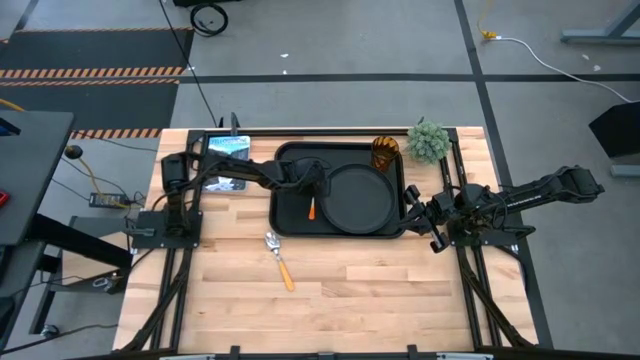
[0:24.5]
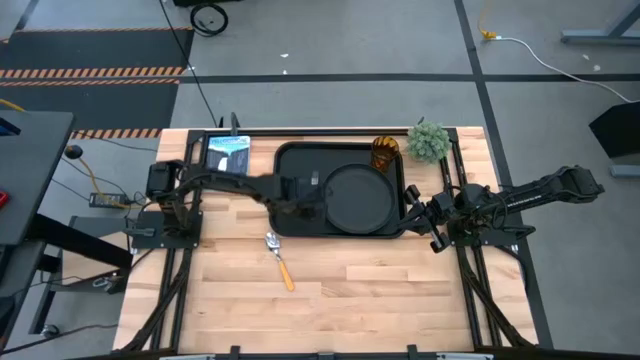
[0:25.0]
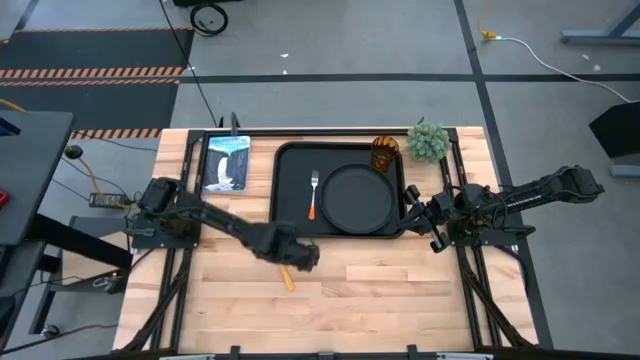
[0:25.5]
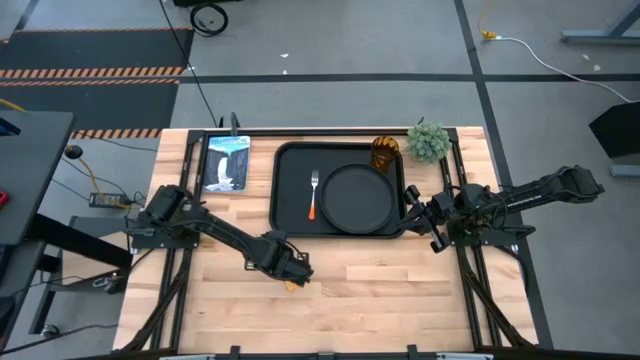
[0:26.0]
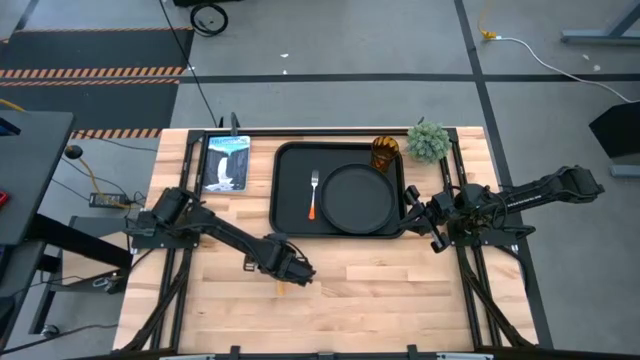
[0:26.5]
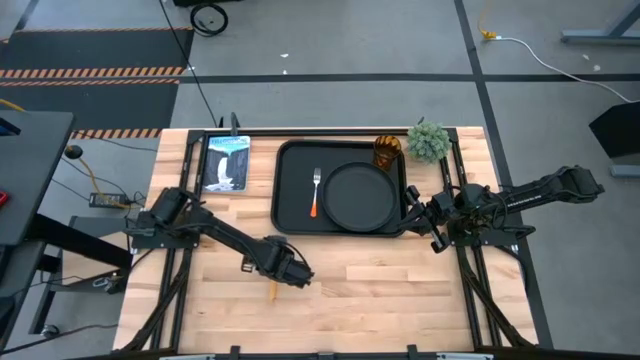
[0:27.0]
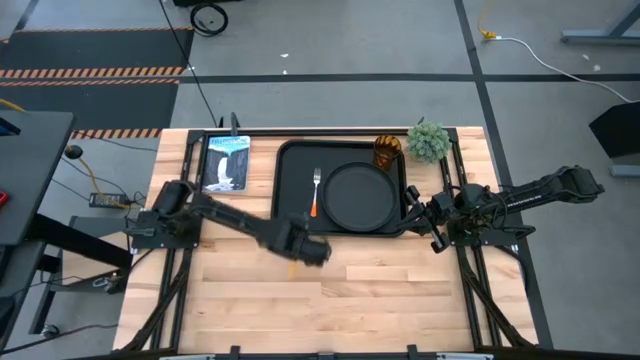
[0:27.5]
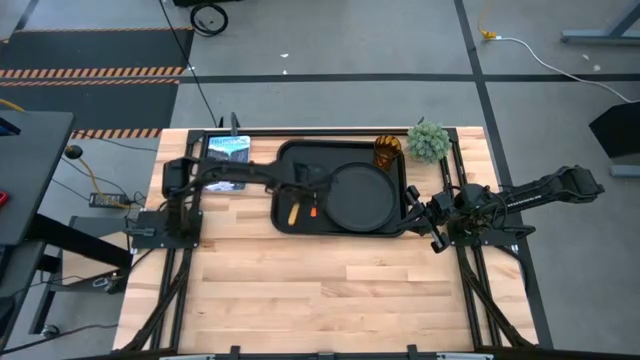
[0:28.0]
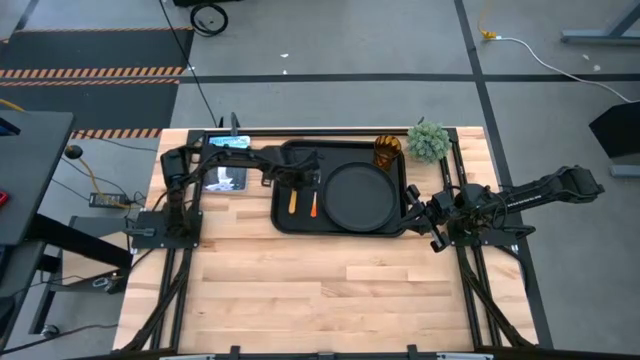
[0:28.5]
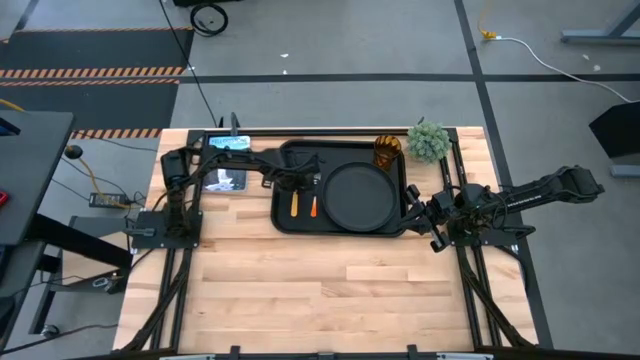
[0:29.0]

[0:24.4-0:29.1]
Task: Pick and place plate/cup/fork/spoon on tray
Put the yellow spoon on the black tray to the left of the orange fork

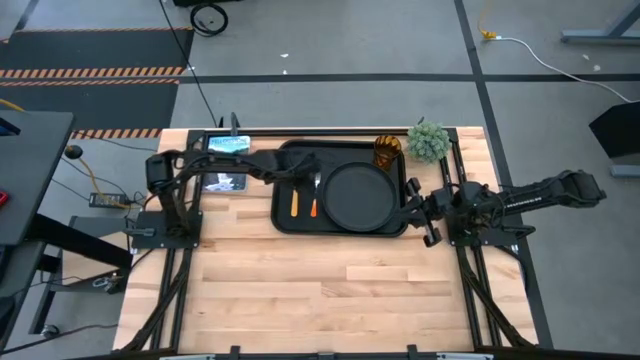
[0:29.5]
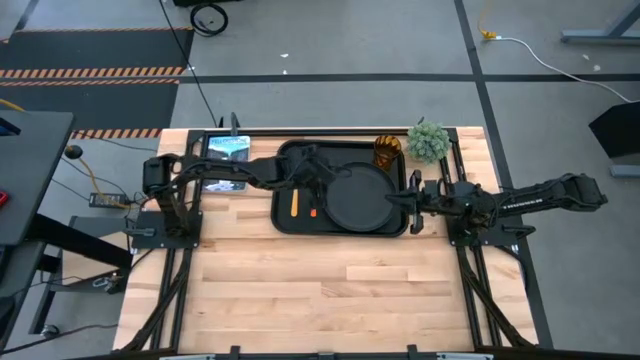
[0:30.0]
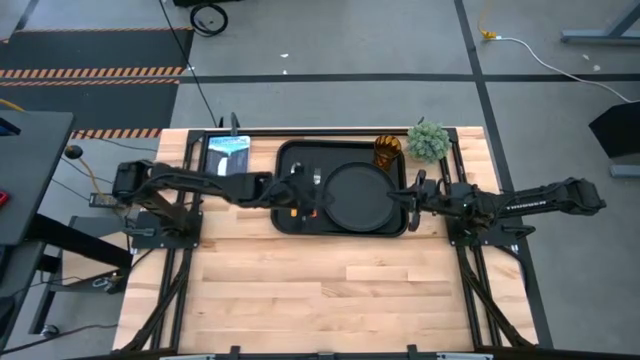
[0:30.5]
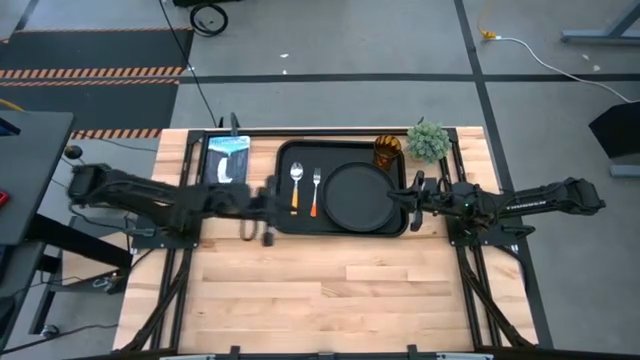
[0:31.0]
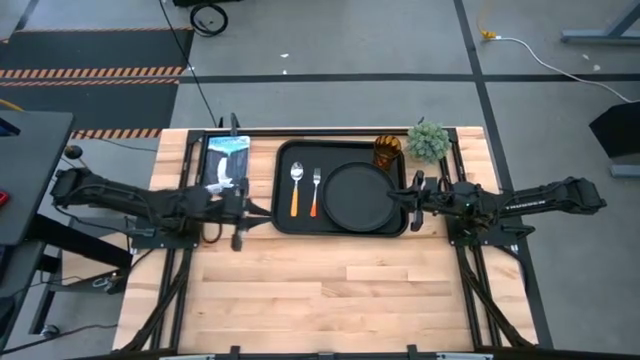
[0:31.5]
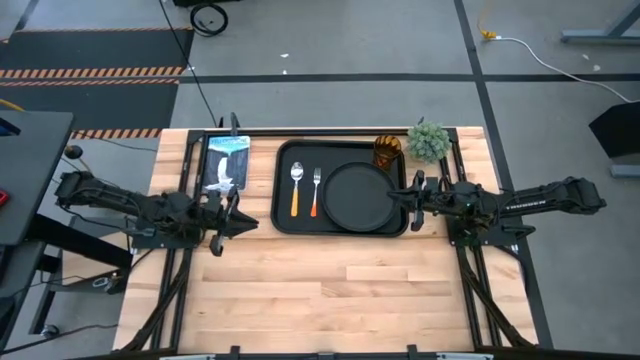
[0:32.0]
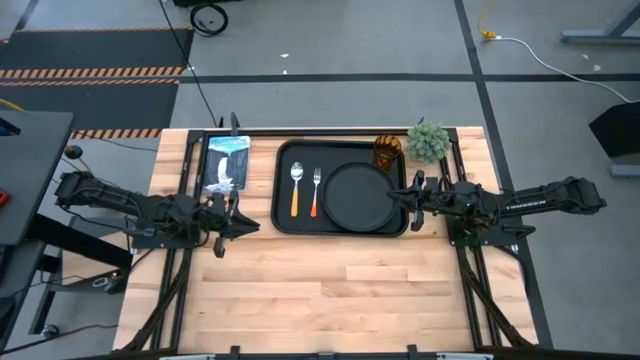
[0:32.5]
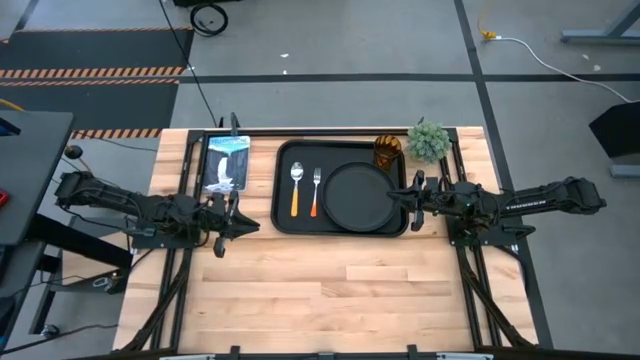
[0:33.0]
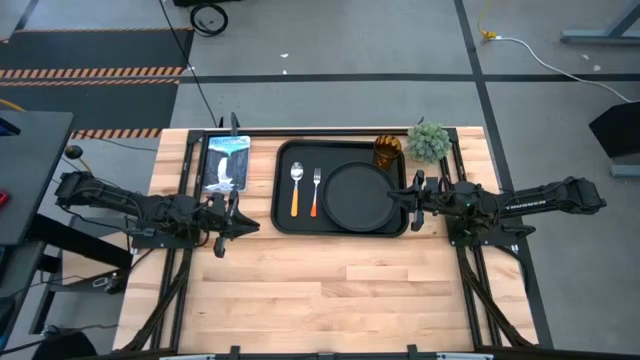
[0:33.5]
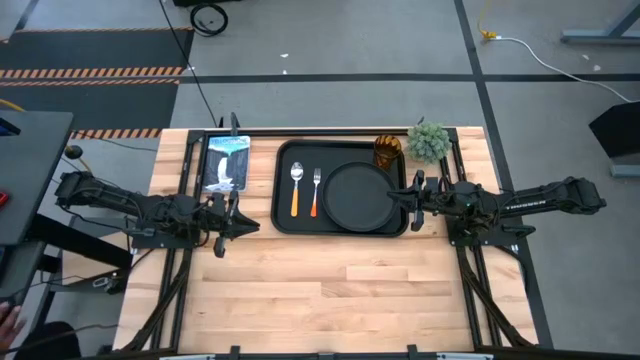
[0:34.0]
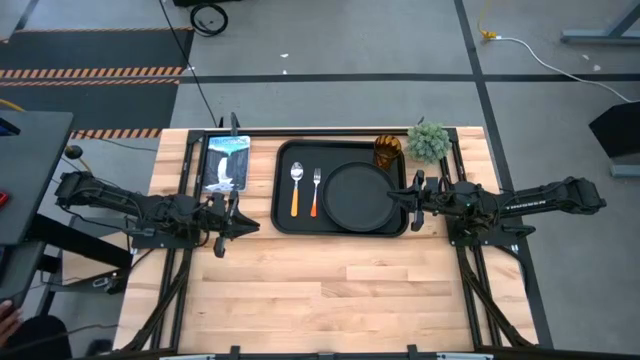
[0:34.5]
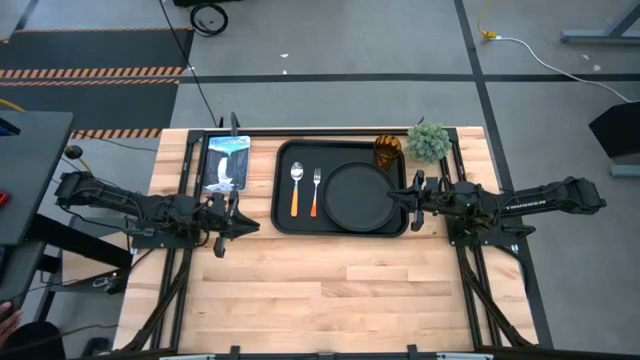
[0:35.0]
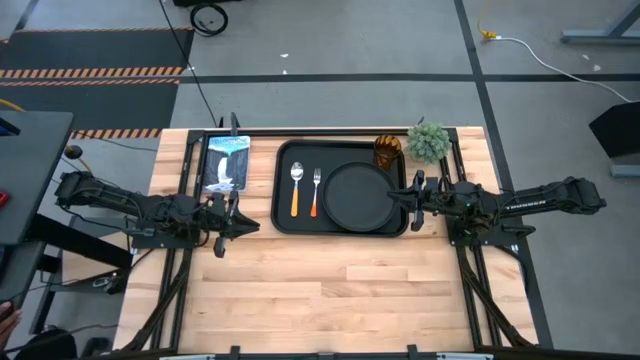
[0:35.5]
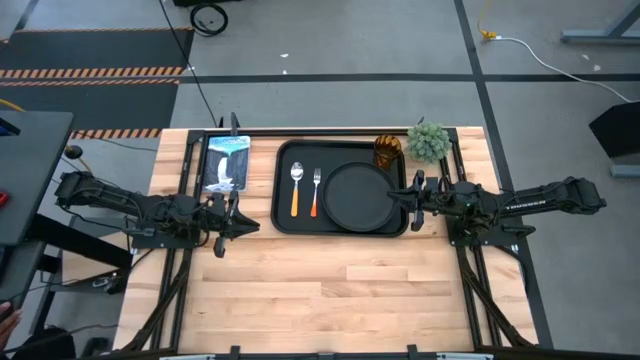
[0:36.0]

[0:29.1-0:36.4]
Return to Home Position

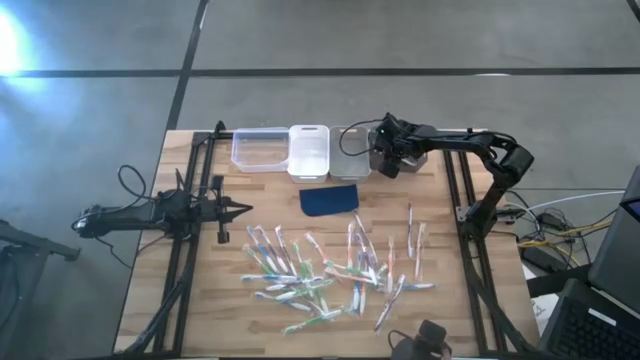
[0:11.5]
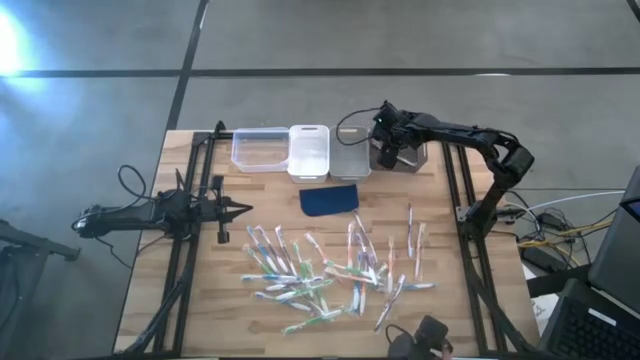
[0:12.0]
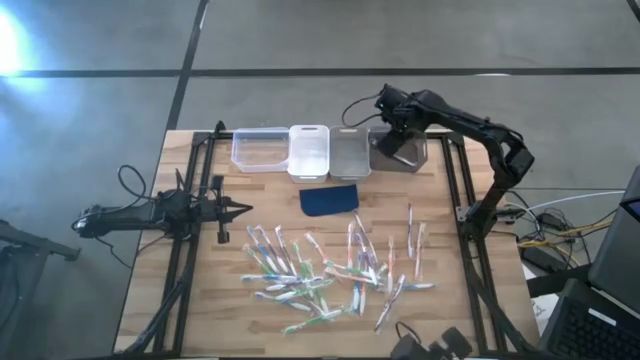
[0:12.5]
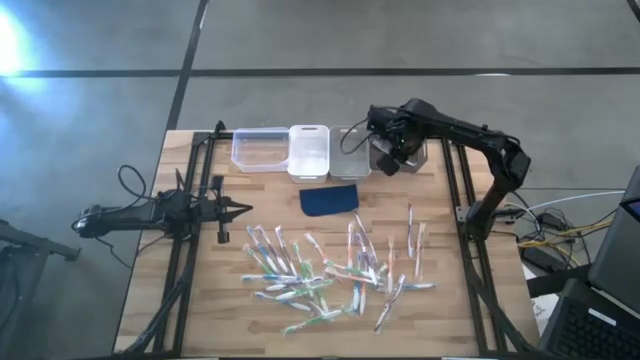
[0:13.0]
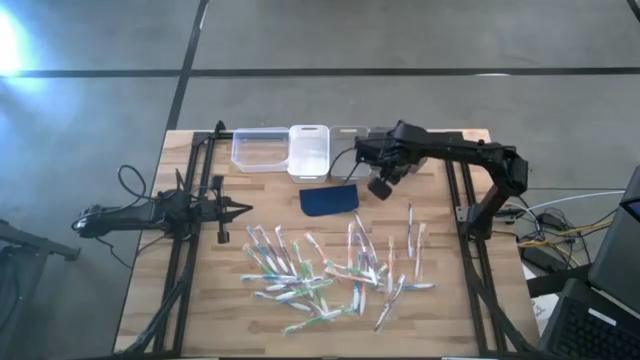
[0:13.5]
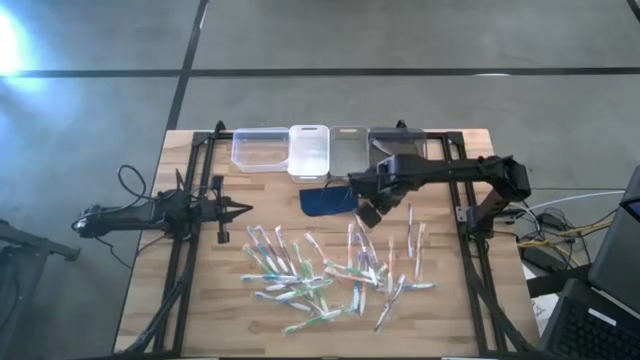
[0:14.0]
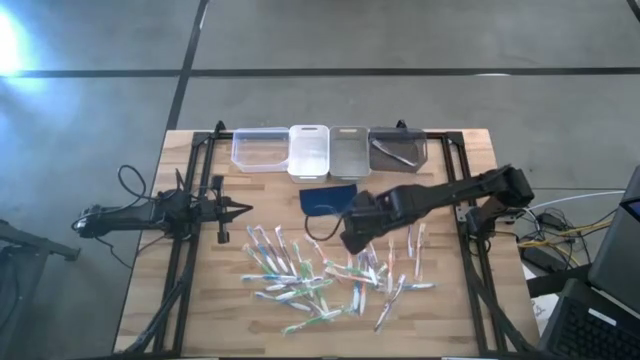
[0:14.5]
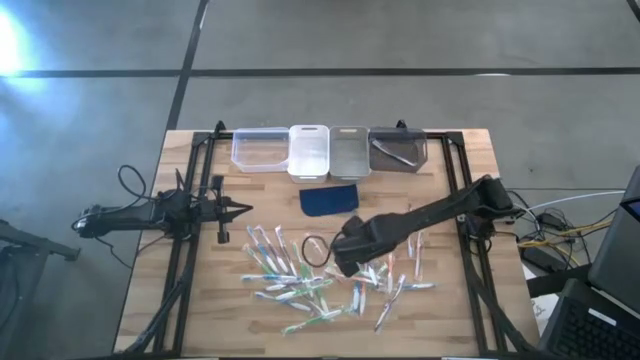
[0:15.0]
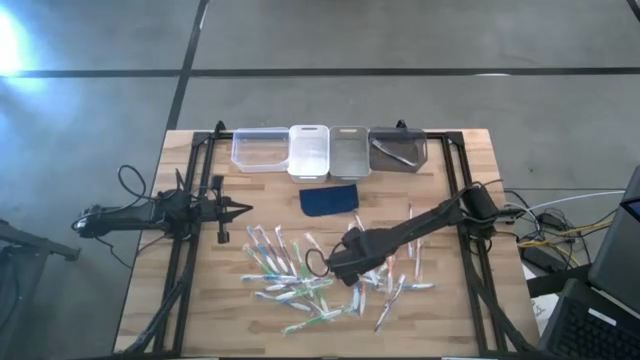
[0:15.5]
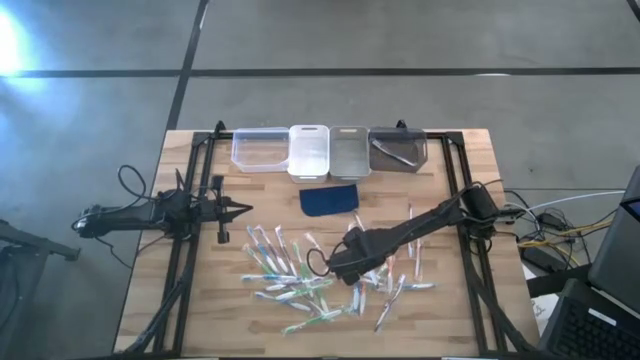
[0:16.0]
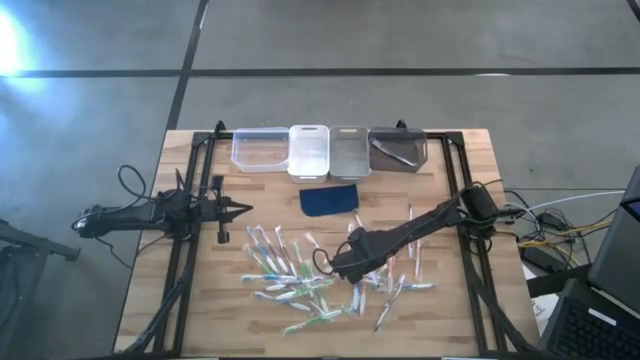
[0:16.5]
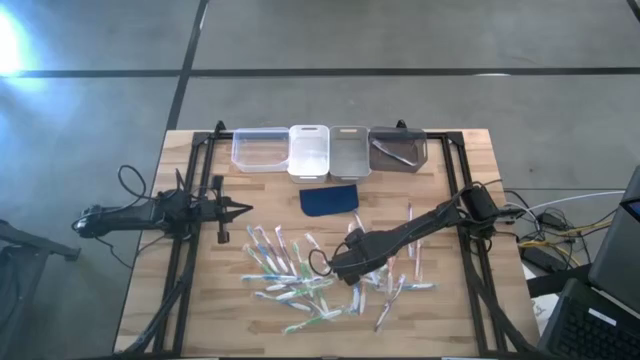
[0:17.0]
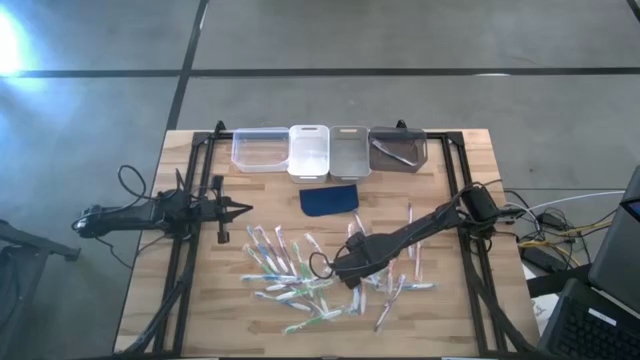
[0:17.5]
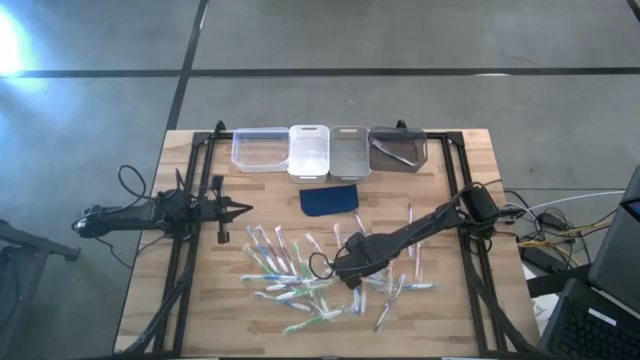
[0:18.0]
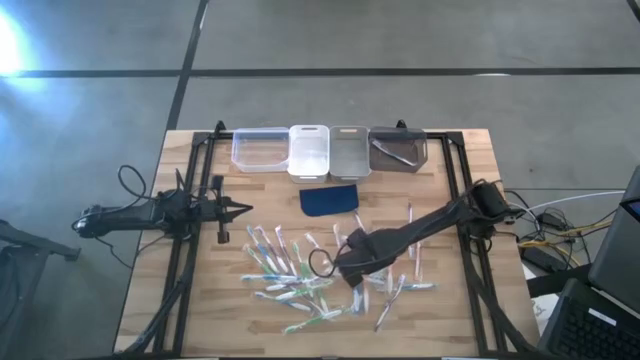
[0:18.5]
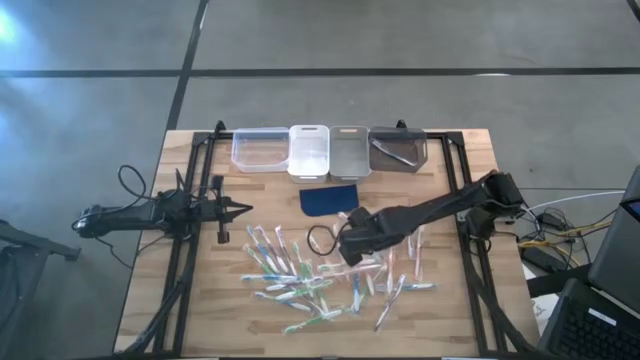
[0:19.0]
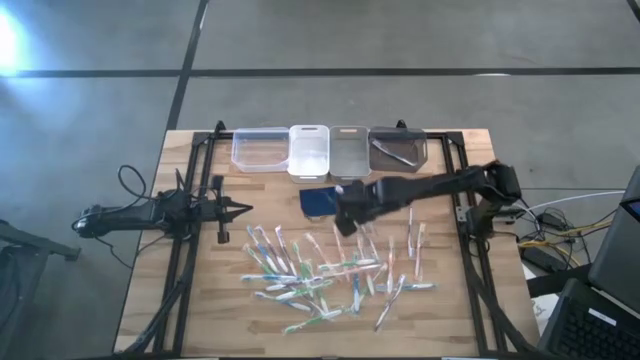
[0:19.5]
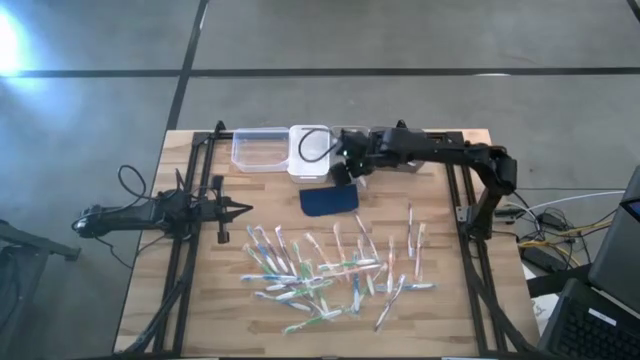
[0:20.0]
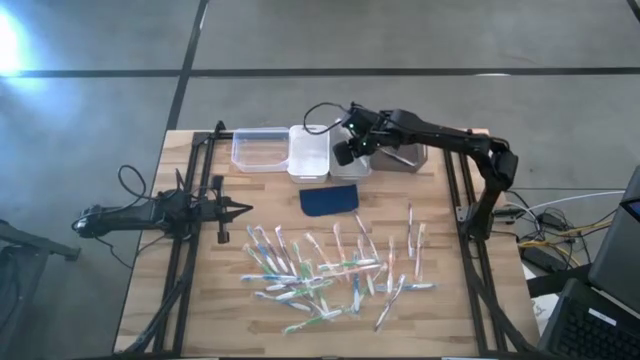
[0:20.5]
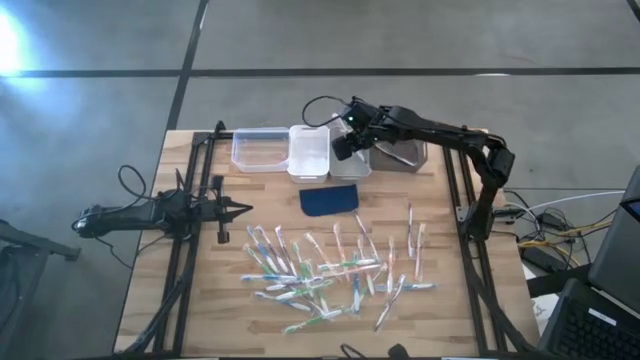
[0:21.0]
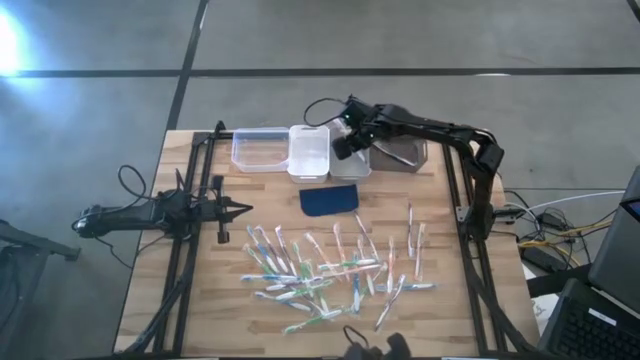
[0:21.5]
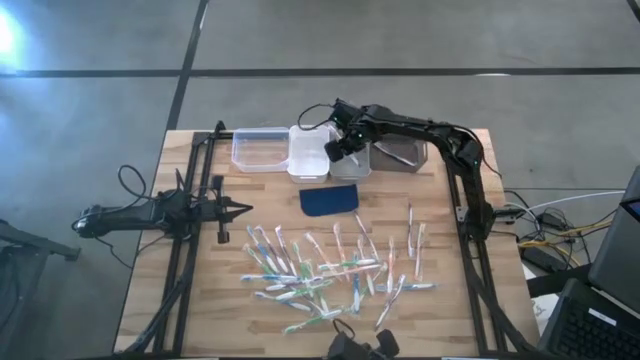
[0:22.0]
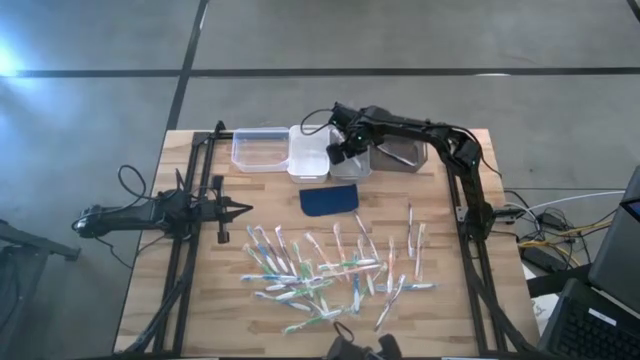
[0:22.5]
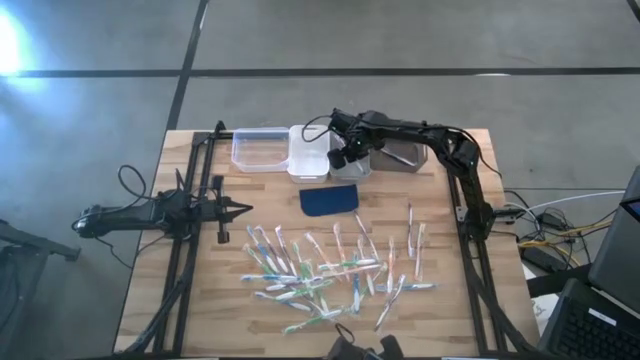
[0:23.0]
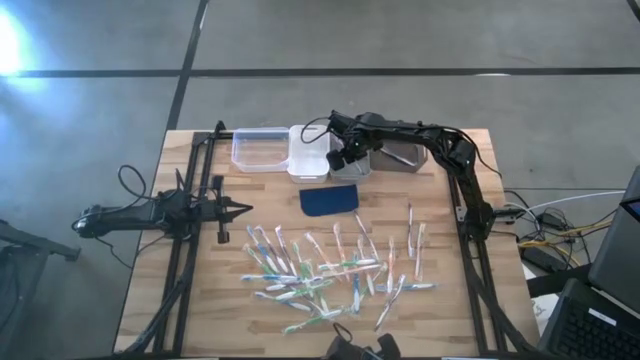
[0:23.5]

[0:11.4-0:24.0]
Task: Pick & Place Toothbrushes
Put the violet toothbrush into the gray bin
